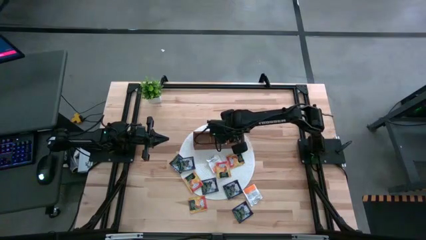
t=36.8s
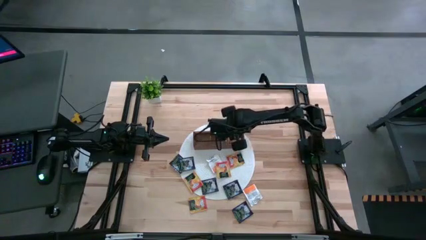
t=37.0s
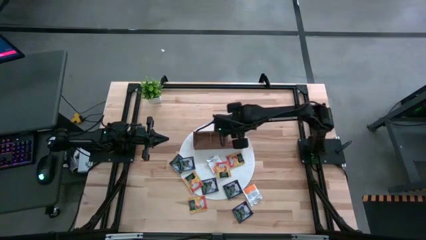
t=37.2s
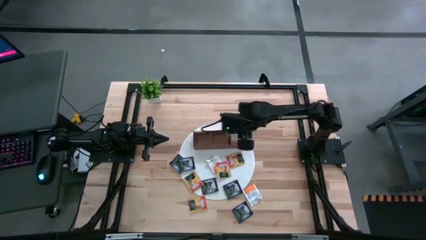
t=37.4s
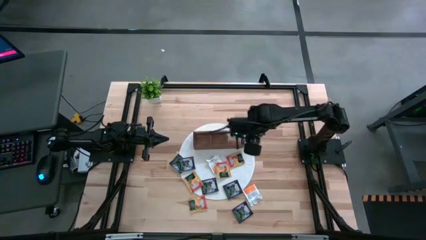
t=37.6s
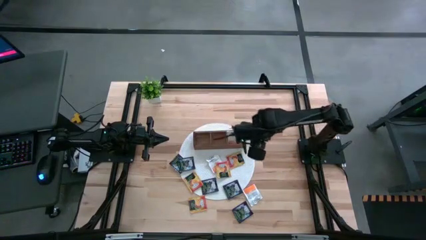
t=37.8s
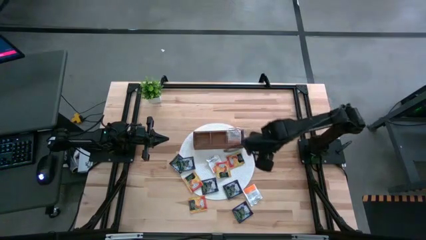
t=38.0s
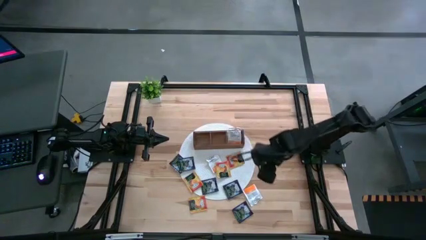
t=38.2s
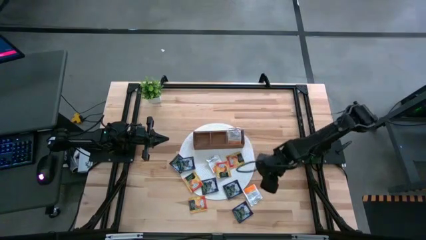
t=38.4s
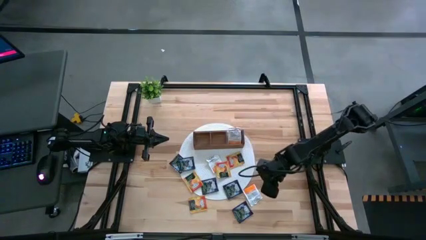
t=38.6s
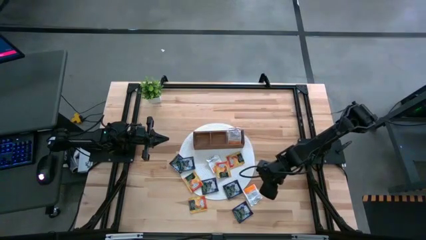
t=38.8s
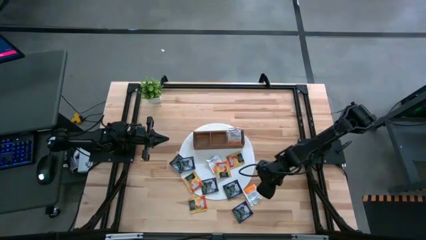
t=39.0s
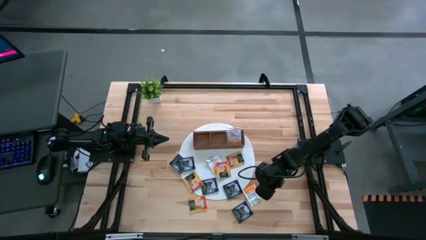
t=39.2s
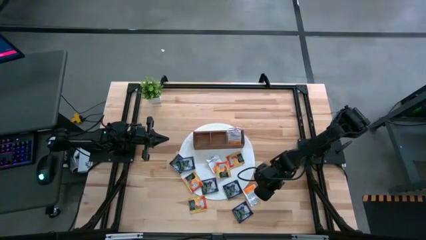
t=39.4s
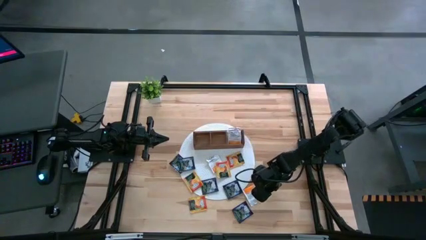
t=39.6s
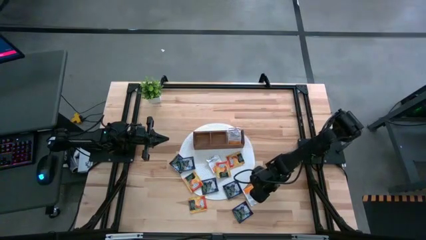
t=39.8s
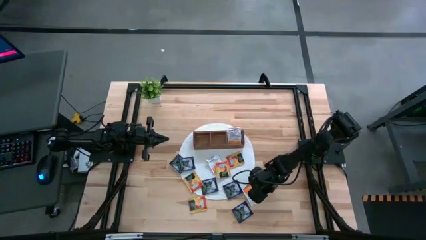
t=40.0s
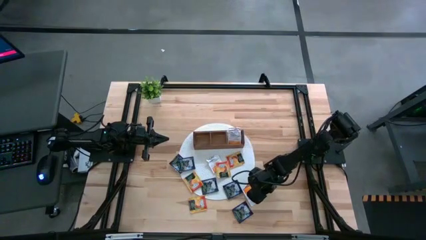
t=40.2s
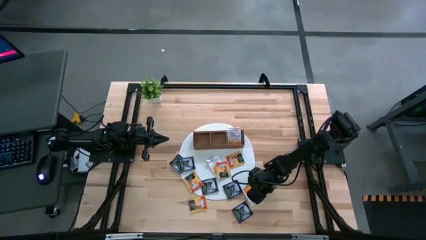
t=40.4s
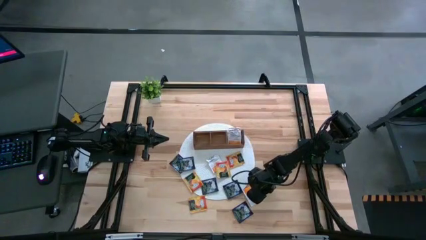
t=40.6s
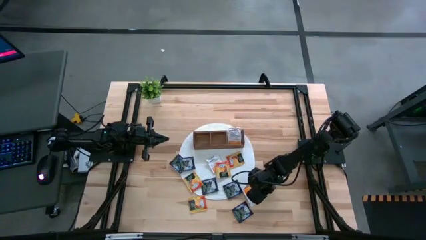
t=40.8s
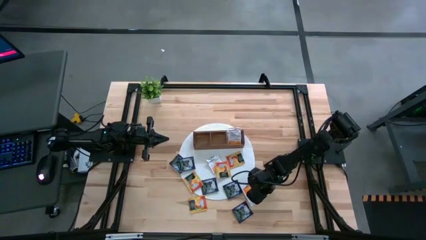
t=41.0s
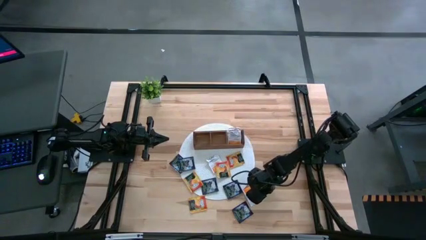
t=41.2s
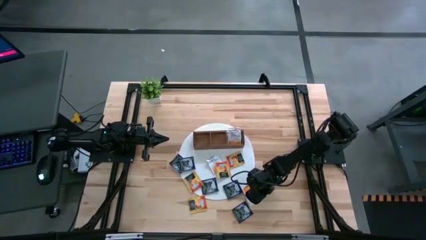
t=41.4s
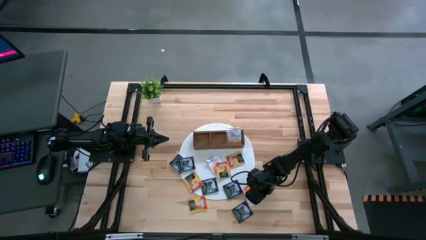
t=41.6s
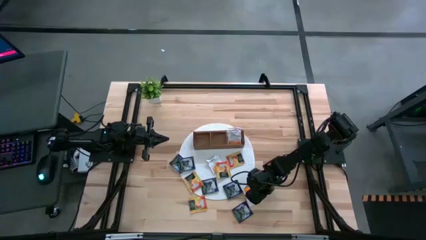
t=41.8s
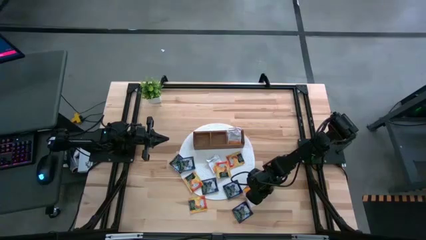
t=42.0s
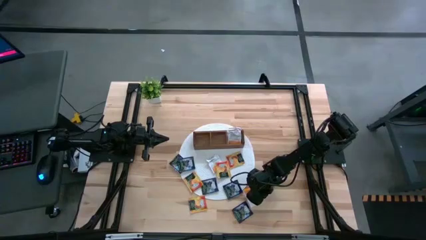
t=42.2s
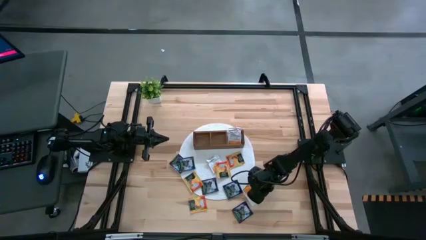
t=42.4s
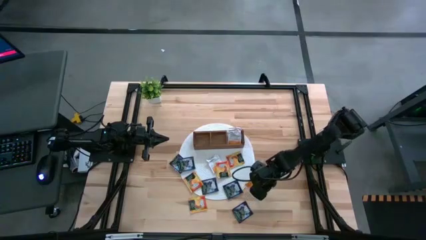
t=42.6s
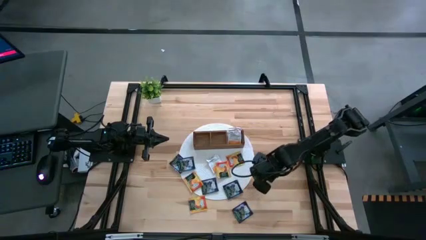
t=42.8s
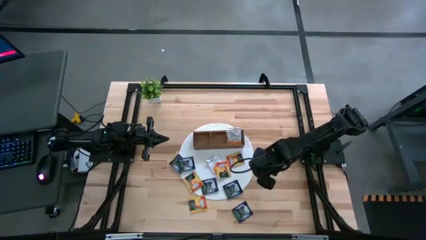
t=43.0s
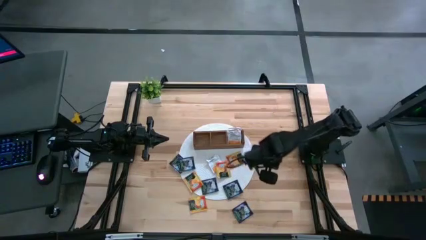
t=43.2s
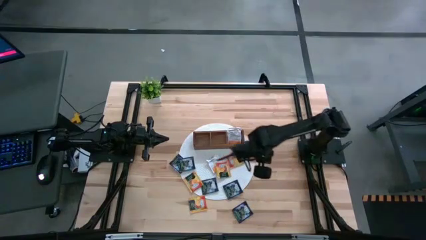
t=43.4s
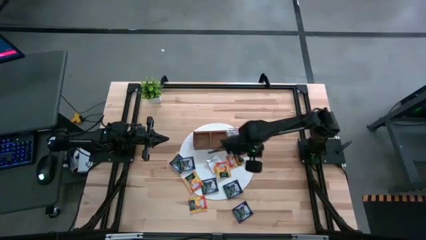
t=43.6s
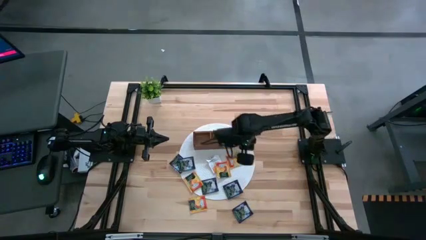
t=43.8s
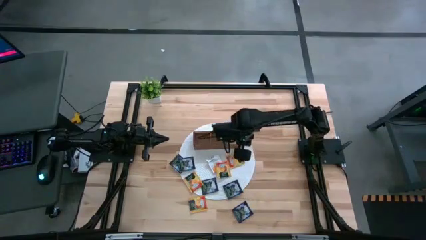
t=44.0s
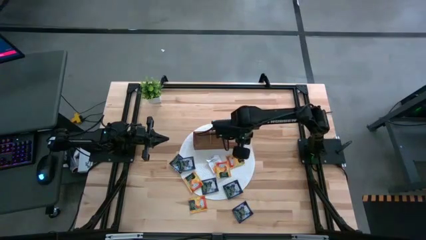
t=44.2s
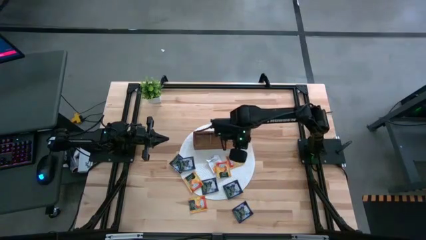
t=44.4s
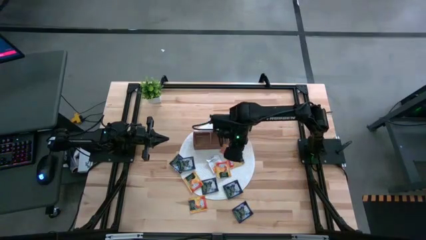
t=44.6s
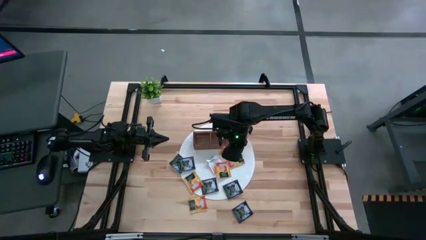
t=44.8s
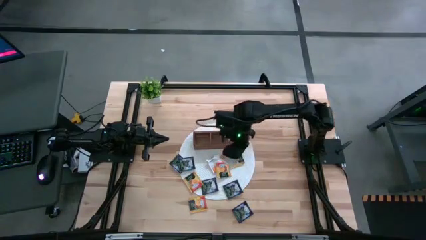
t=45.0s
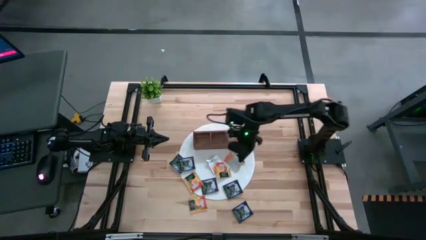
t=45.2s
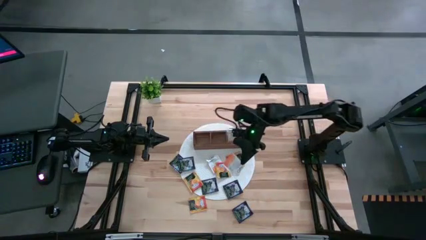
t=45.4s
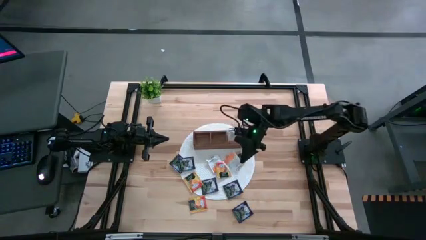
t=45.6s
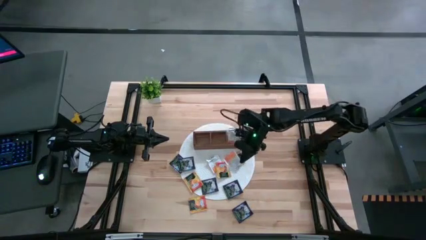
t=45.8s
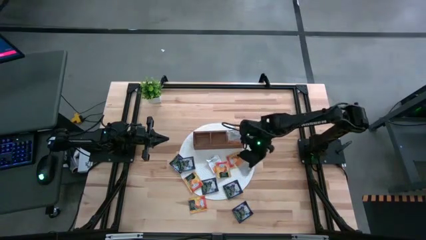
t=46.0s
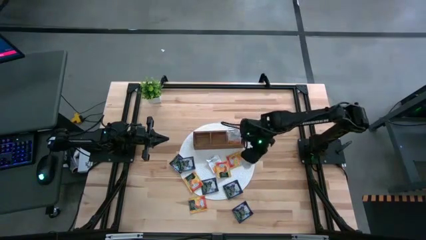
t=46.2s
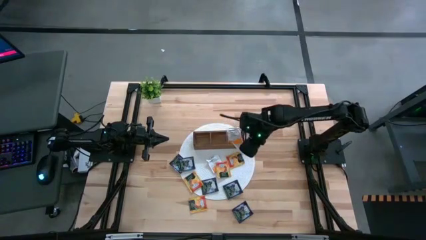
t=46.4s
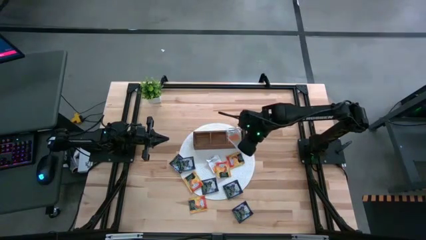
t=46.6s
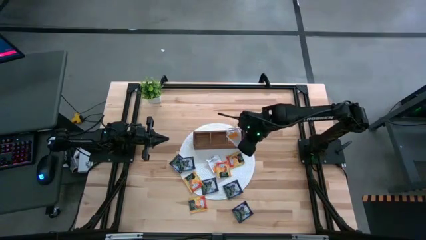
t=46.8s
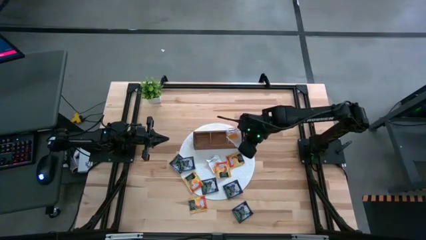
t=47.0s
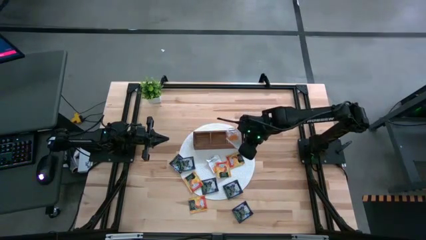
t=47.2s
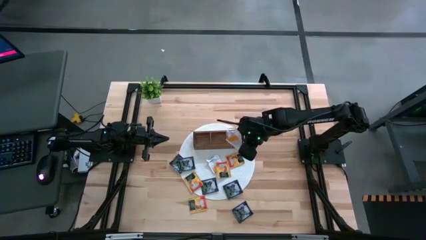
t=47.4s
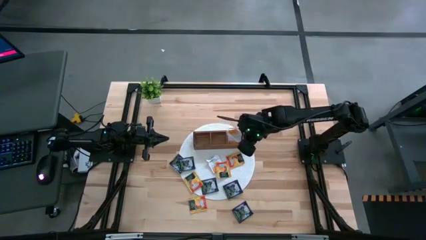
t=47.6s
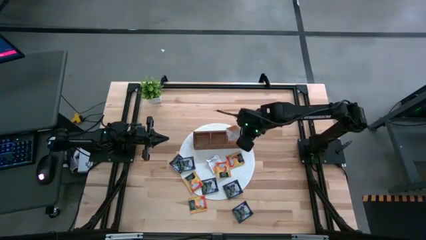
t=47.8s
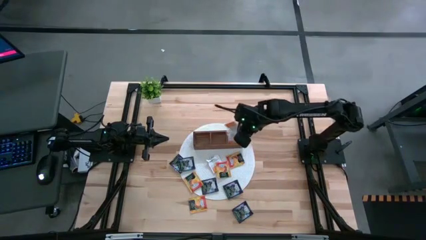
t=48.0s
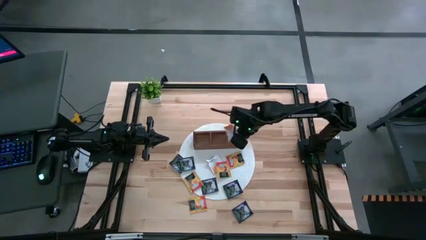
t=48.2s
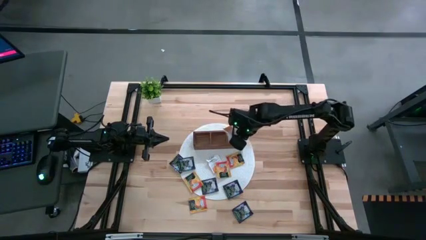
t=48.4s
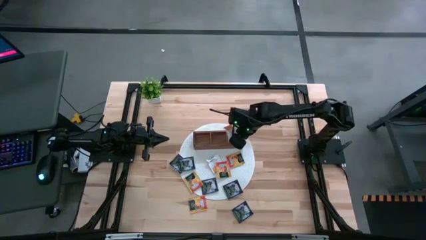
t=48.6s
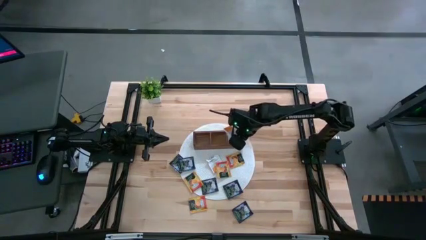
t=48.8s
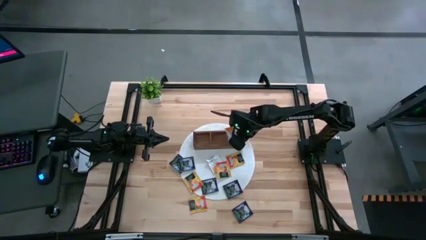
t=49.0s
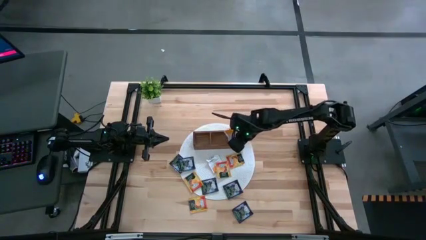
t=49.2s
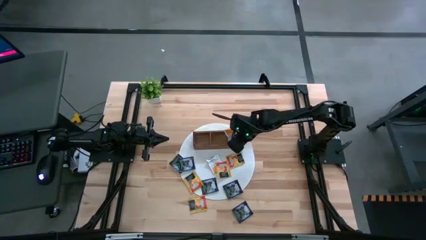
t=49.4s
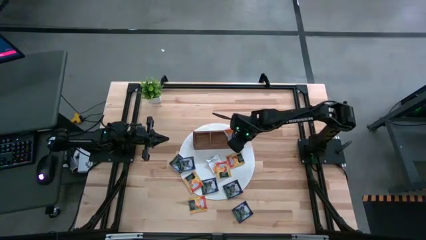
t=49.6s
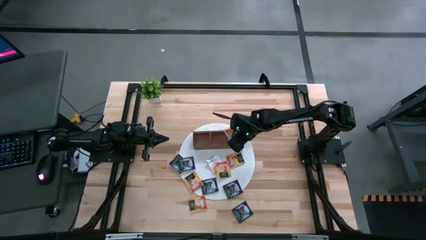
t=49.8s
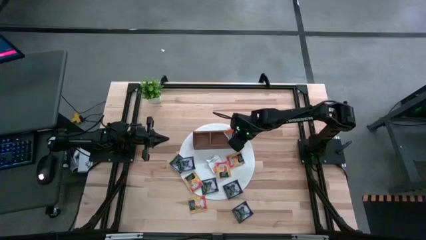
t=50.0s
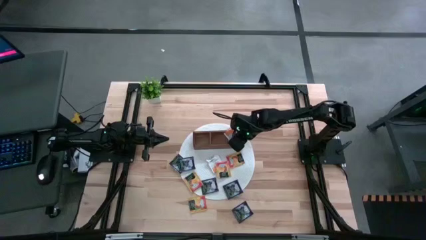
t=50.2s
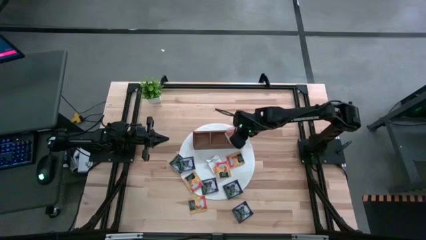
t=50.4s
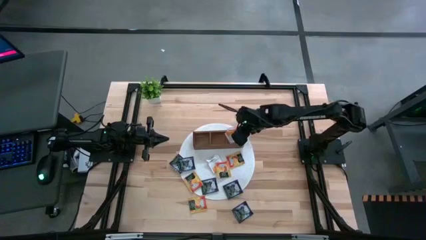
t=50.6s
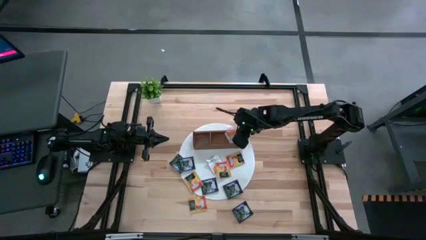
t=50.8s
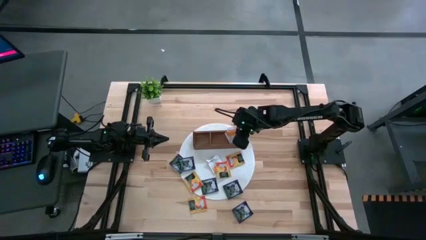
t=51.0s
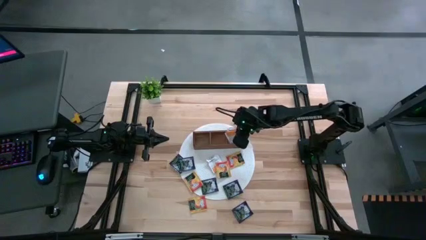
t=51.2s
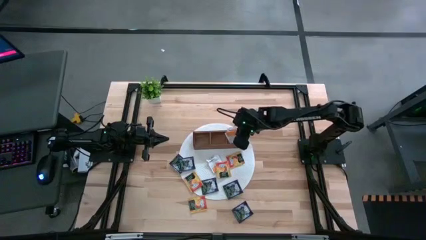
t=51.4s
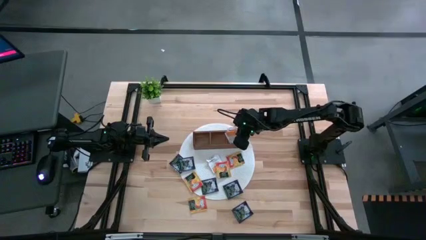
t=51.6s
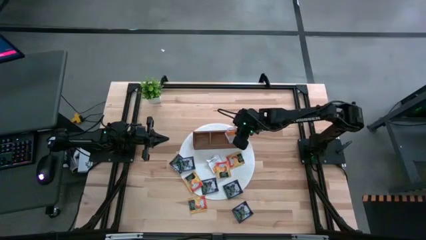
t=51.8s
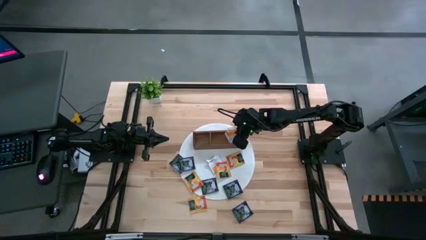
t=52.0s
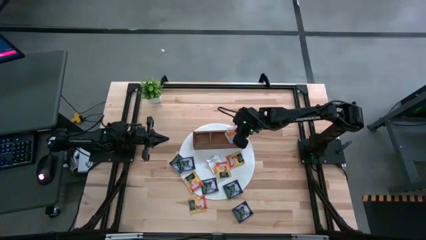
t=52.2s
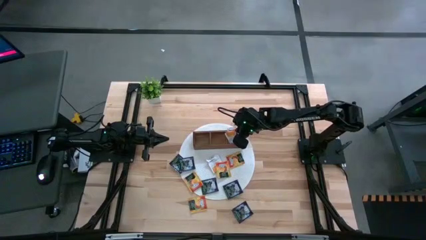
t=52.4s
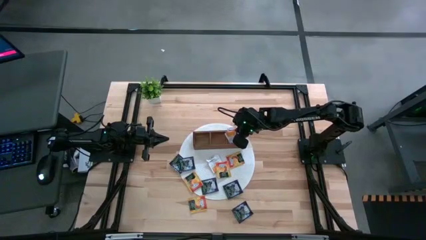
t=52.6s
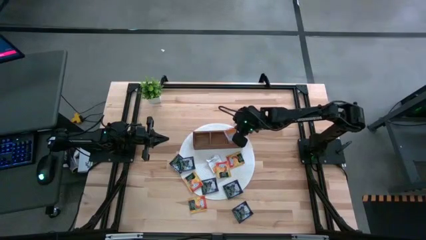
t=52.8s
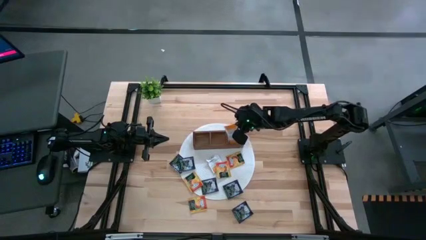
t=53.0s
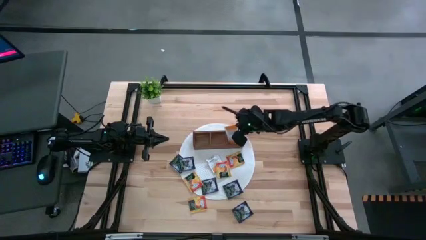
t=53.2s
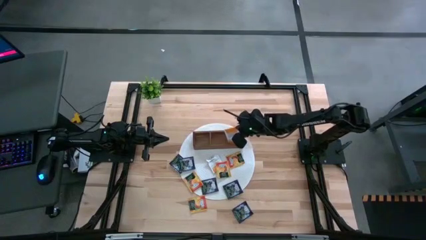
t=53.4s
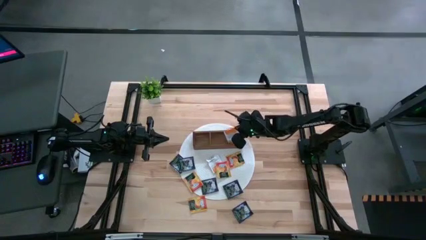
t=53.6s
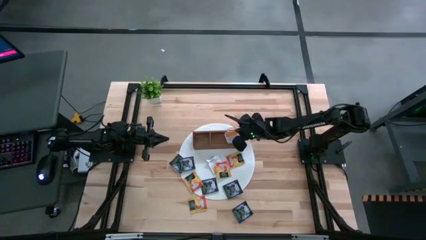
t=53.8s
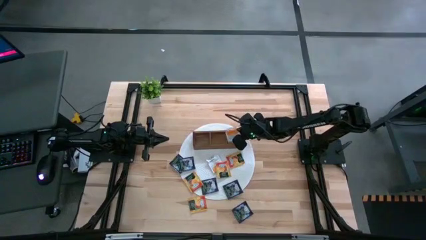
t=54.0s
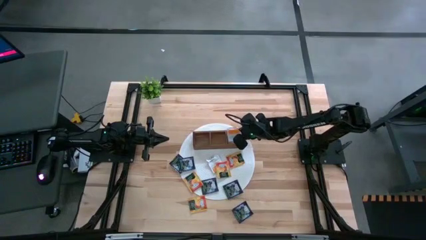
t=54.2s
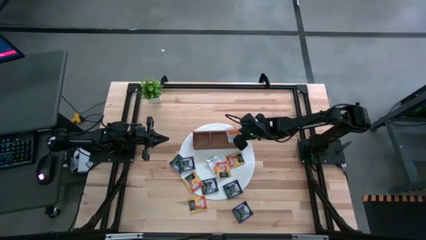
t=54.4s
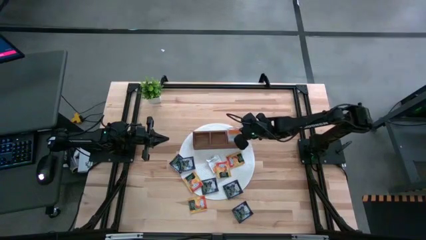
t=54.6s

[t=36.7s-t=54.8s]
Task: Pick & Place Tea
Put the white tea bag into the right section of the wooden organizer
